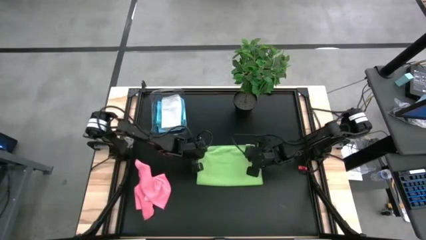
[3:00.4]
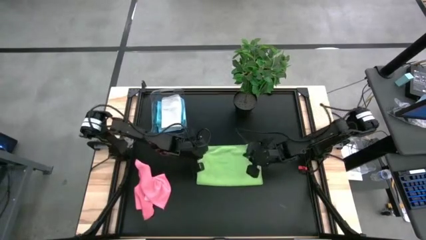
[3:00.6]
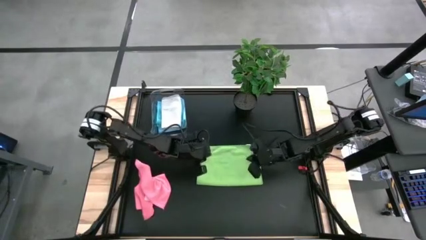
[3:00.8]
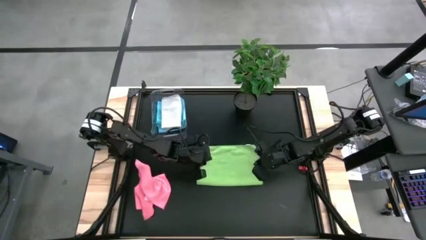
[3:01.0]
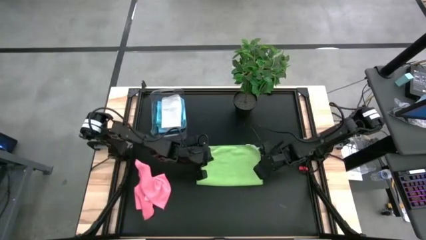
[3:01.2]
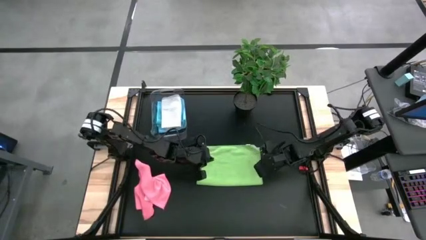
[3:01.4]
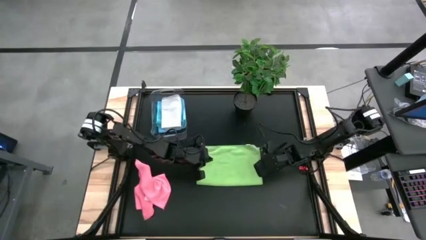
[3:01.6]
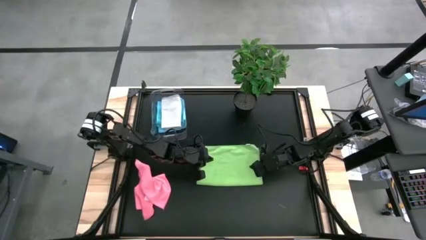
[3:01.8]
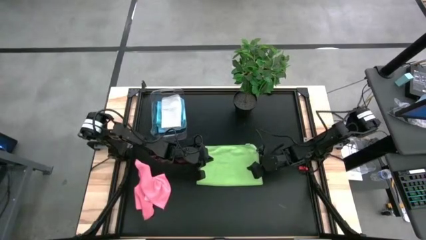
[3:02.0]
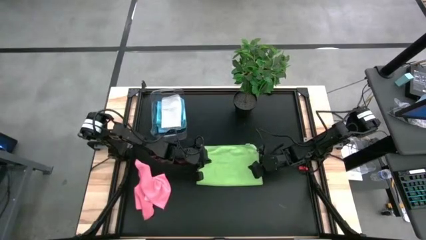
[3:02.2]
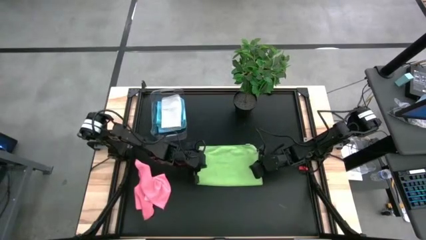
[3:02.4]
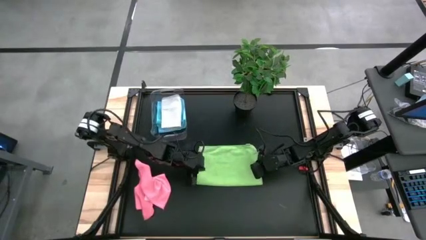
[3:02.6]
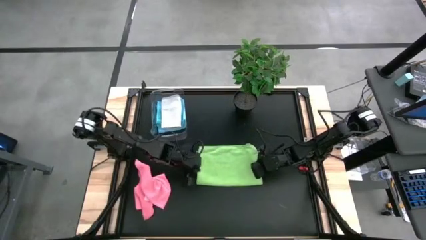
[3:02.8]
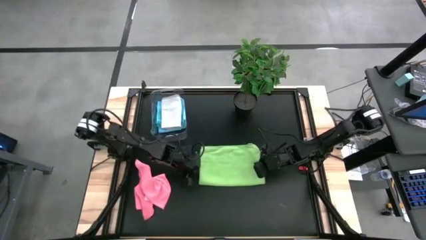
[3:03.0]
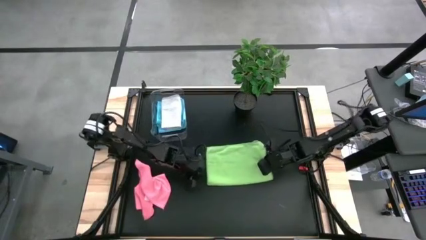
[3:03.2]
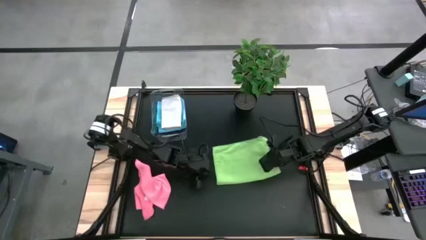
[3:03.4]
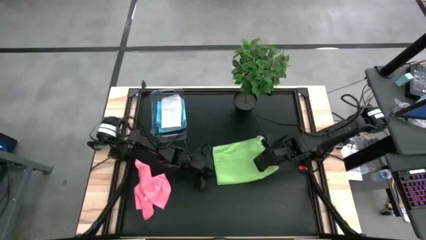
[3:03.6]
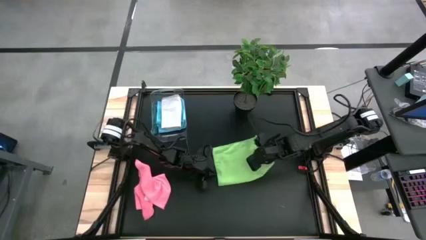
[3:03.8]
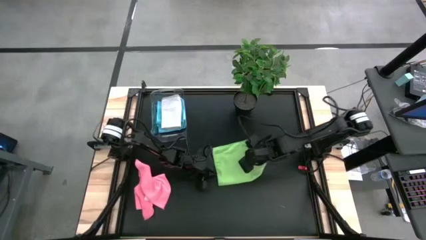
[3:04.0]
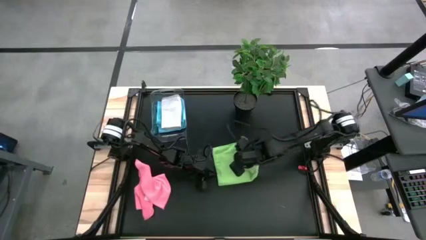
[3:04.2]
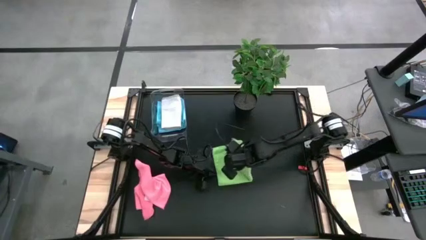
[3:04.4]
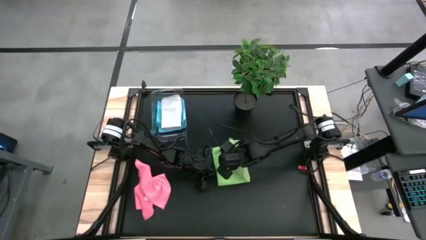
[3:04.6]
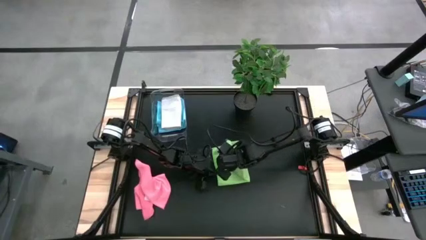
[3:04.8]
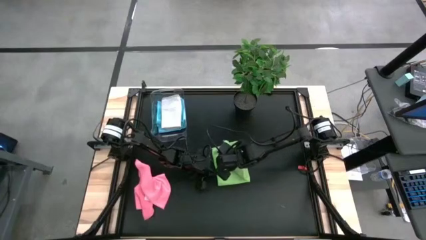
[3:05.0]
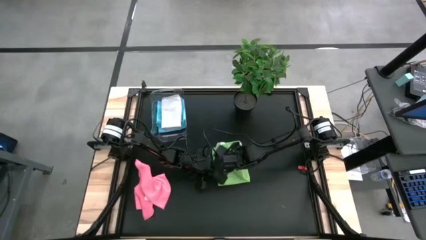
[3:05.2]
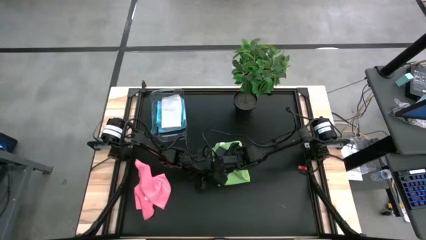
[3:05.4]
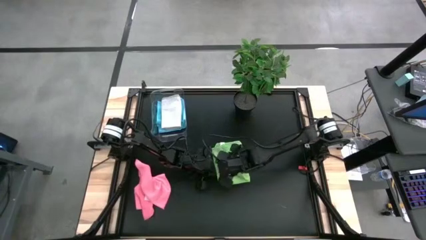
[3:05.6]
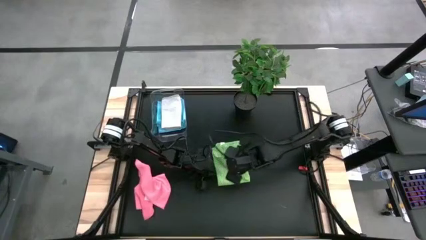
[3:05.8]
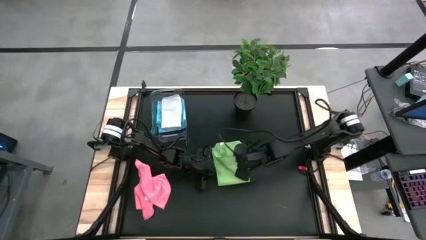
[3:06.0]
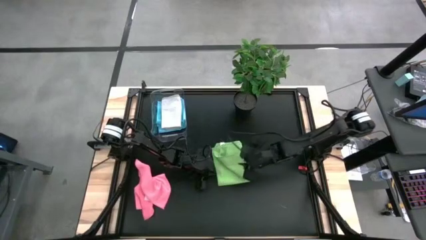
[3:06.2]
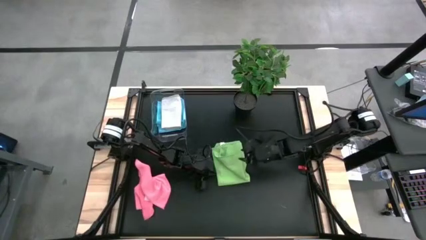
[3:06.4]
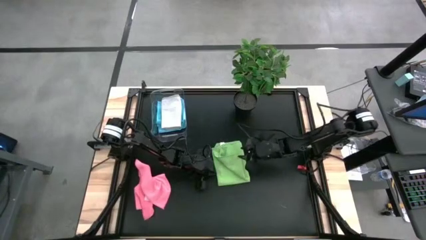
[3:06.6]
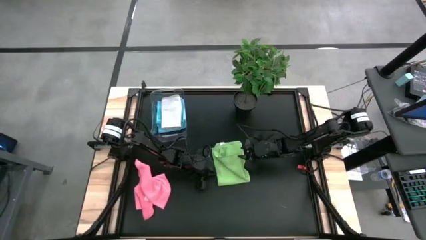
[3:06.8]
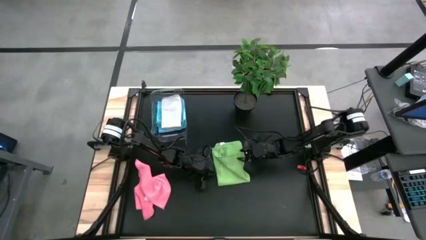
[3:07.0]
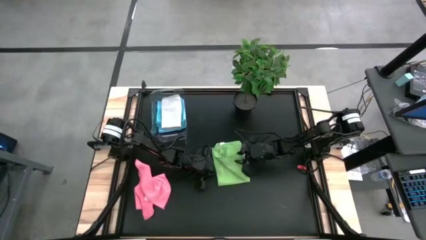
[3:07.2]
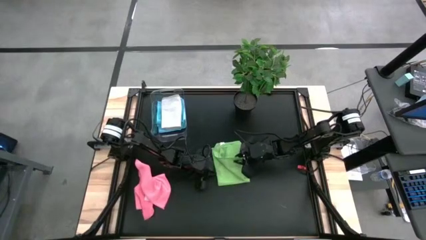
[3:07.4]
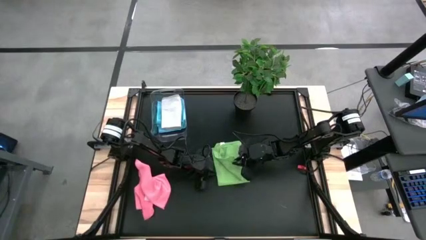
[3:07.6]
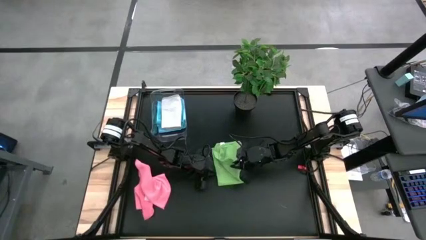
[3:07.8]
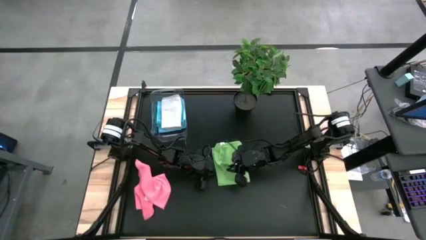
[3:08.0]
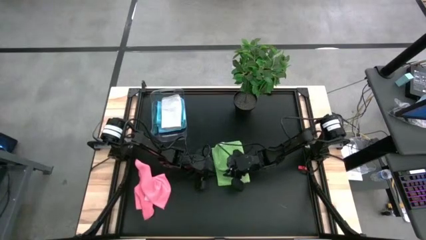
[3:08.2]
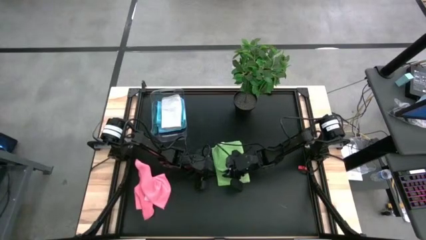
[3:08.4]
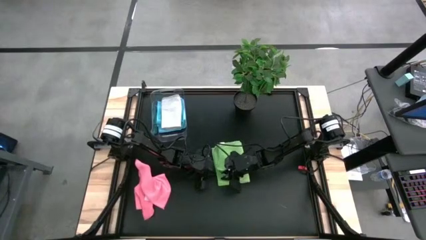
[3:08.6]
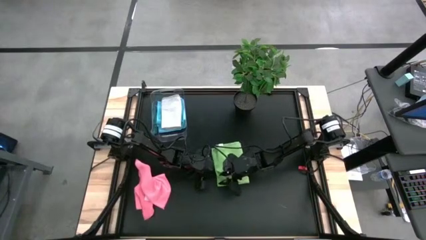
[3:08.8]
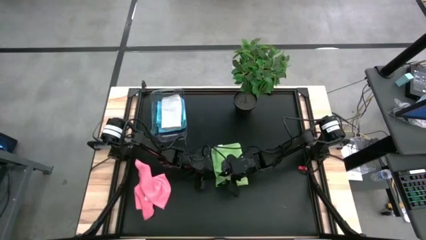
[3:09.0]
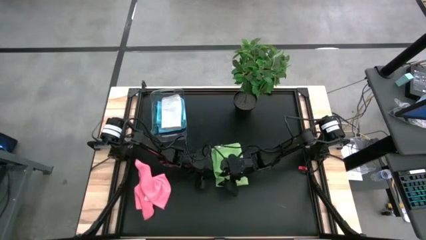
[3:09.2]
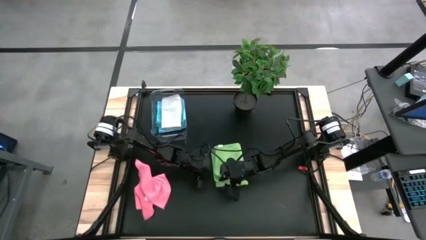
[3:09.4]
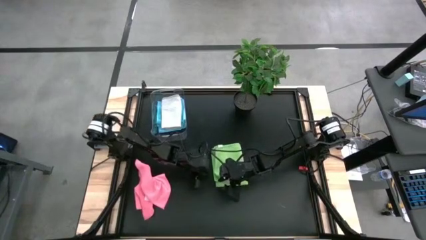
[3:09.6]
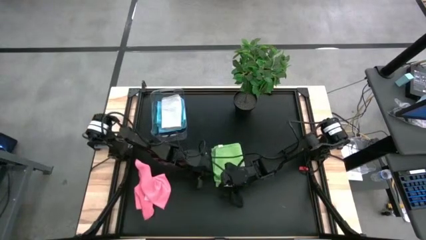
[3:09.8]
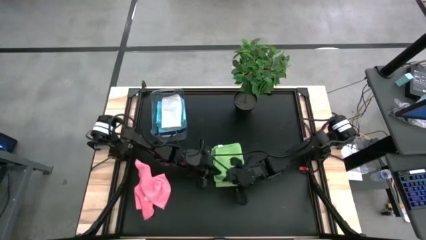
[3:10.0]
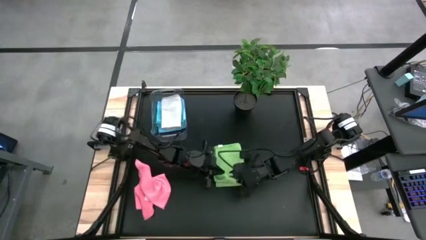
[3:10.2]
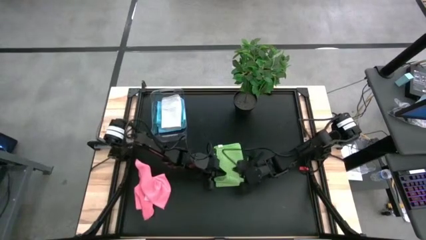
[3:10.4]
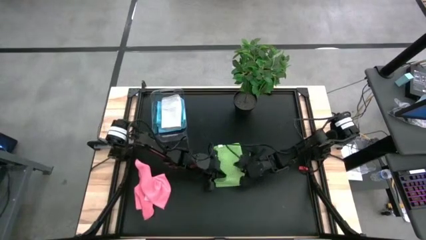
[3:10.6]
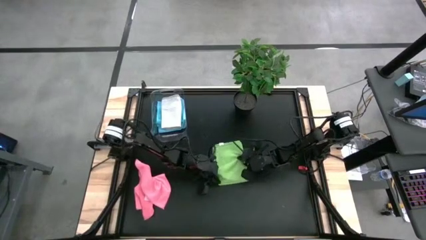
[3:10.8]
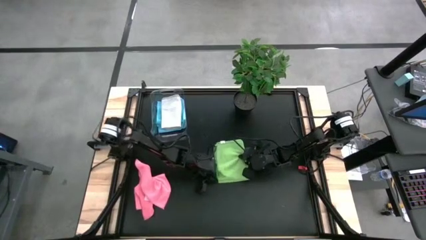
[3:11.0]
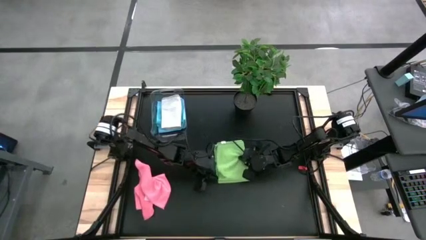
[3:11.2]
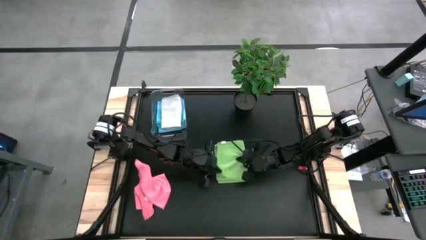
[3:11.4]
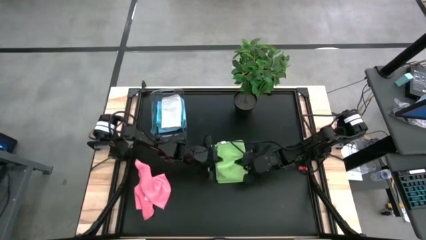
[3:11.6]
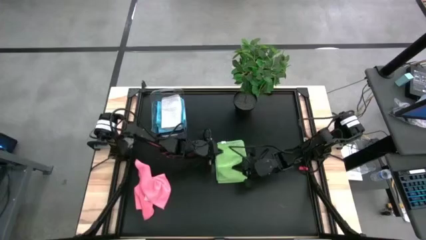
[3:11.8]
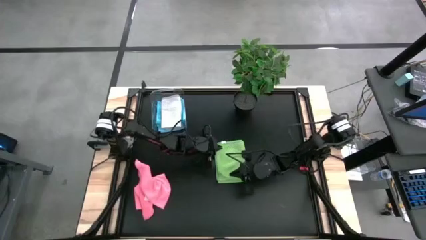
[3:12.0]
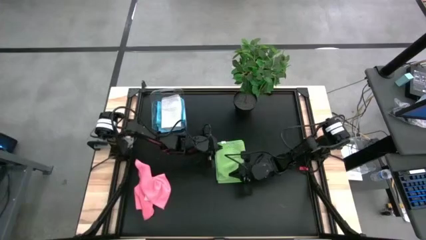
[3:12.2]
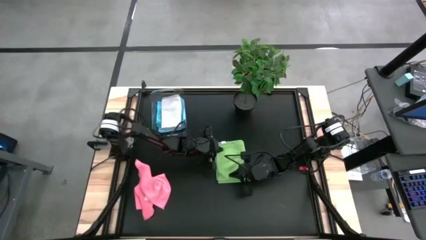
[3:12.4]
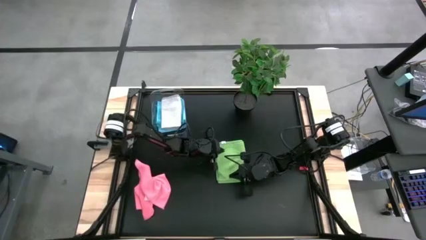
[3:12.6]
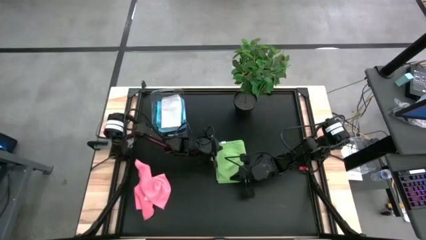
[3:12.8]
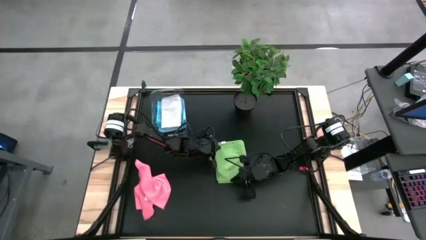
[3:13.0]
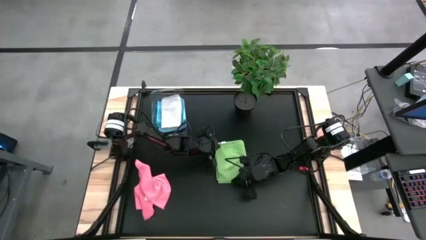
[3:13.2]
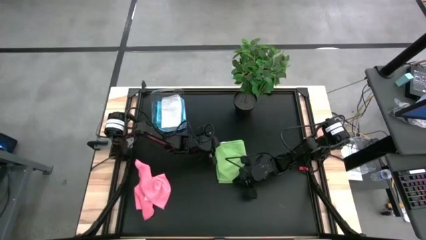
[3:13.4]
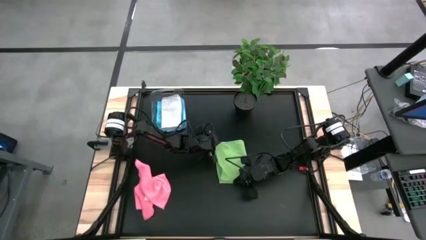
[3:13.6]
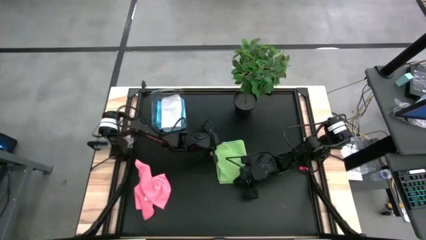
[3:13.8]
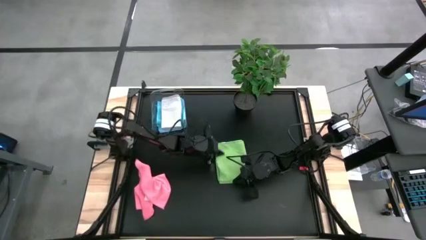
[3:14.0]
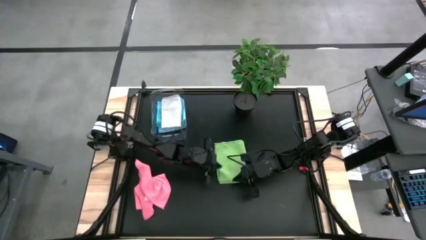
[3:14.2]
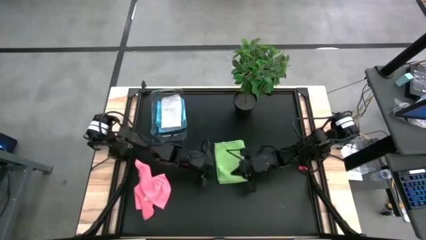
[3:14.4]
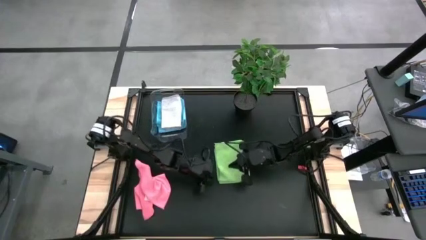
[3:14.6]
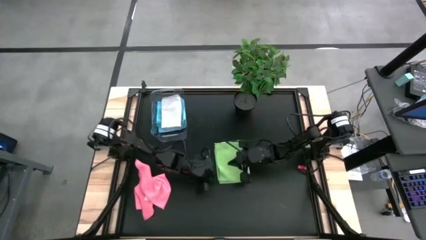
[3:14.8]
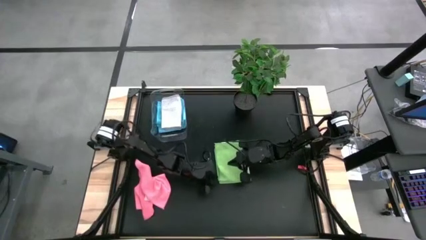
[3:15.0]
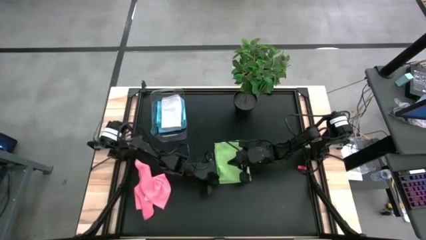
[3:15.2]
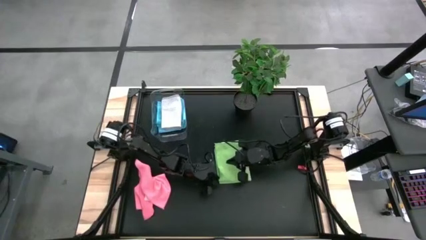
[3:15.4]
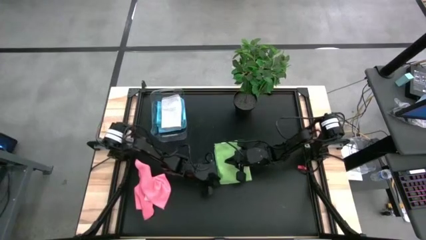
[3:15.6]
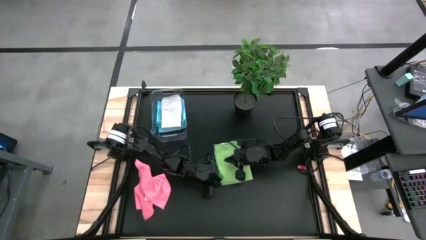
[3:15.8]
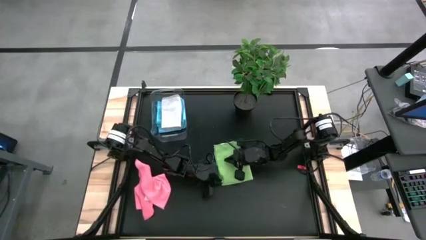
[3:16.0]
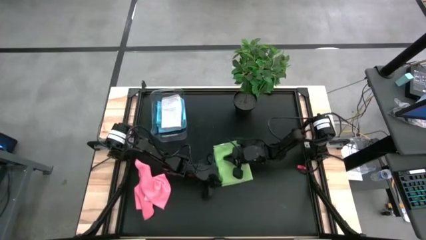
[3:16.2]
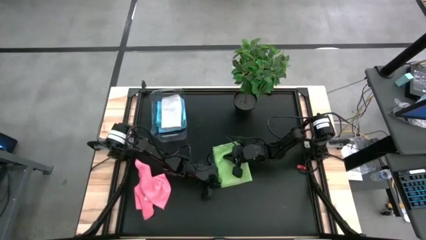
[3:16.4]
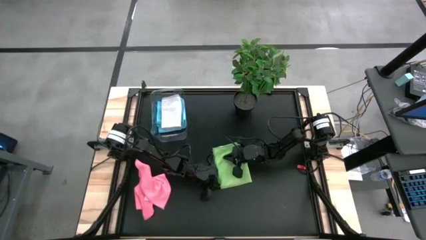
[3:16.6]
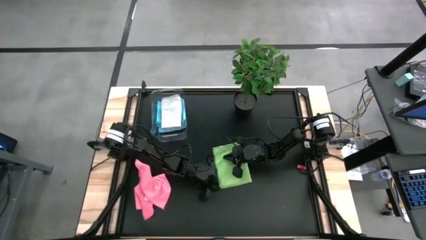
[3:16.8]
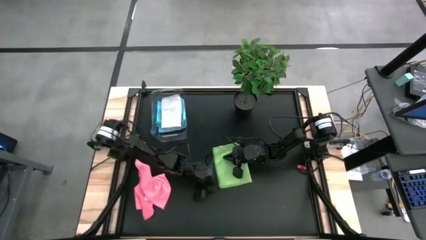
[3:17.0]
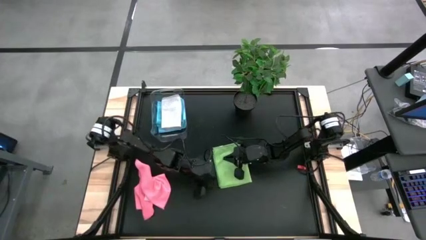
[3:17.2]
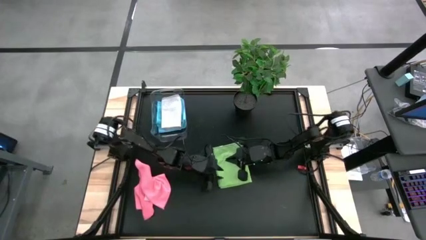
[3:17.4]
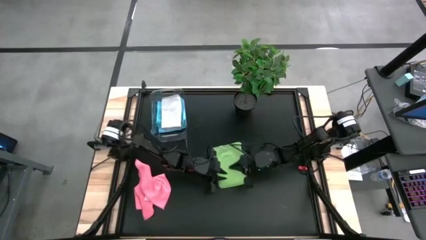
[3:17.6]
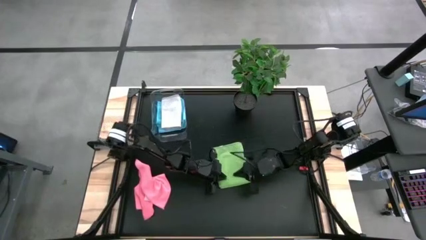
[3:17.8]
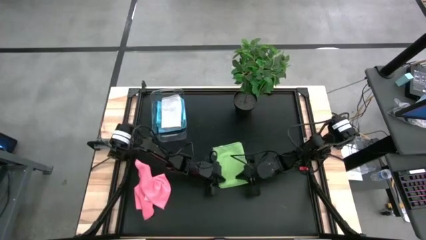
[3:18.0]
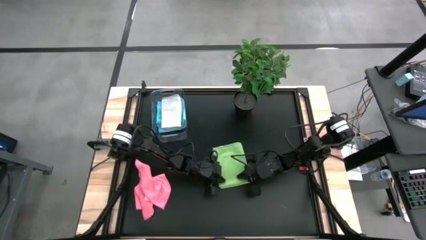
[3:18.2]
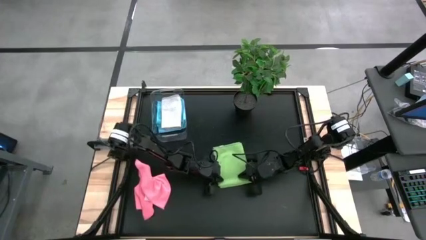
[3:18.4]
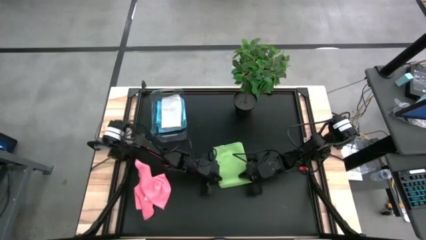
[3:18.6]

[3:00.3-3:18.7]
Task: Fold microfiber towels
Fold the green microfiber towel
